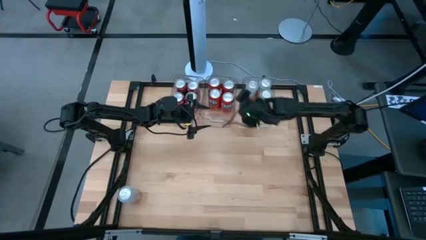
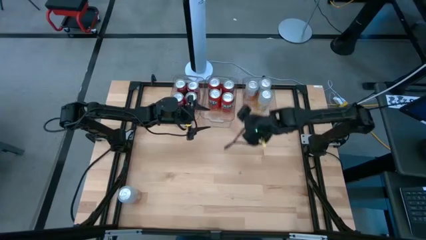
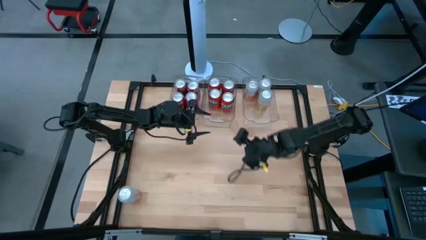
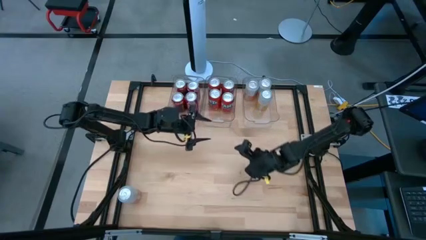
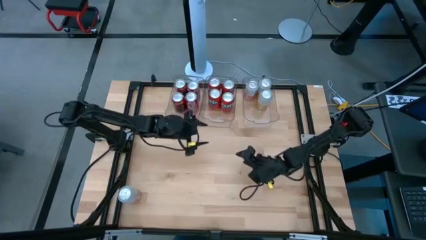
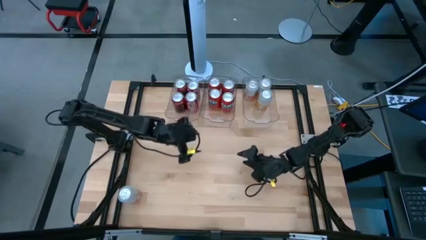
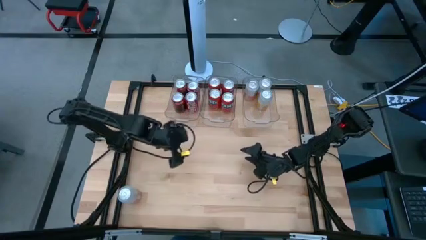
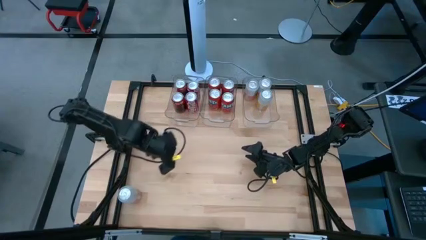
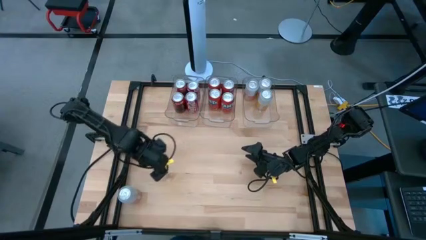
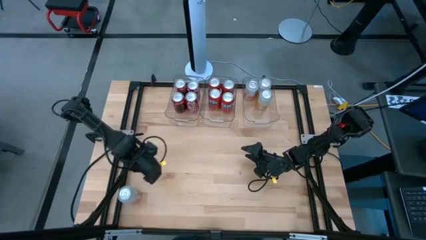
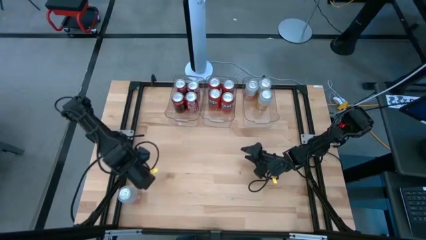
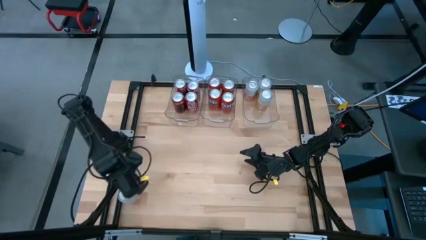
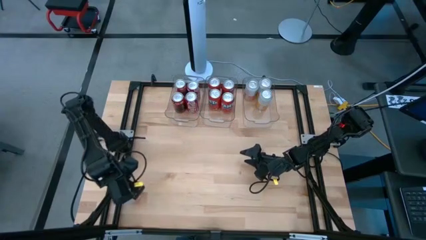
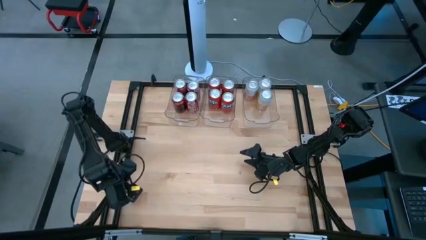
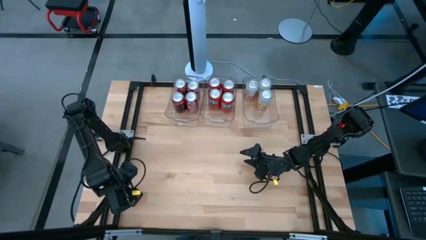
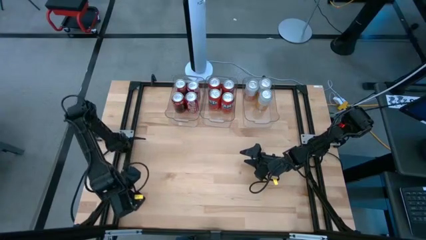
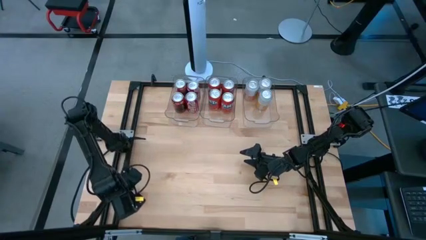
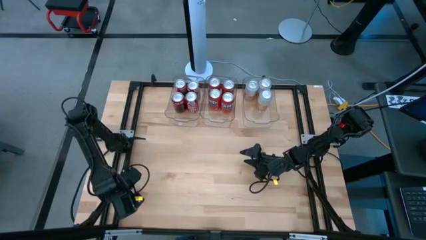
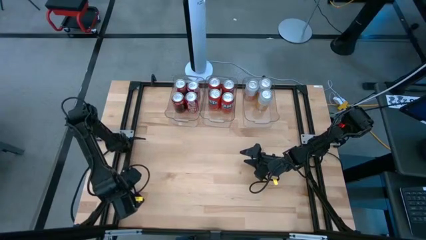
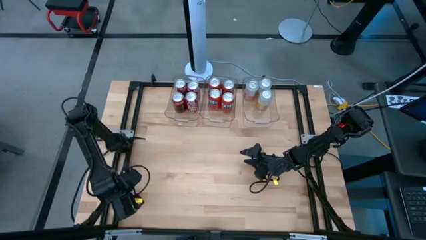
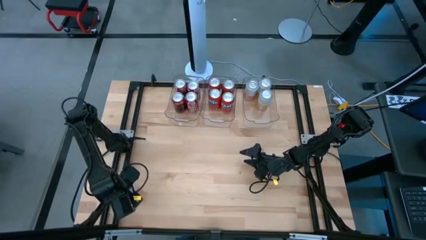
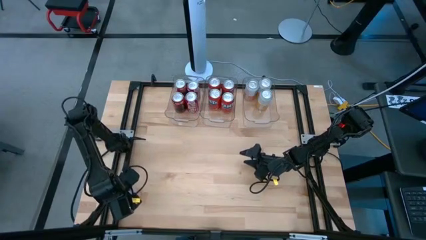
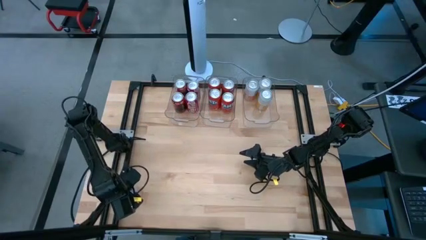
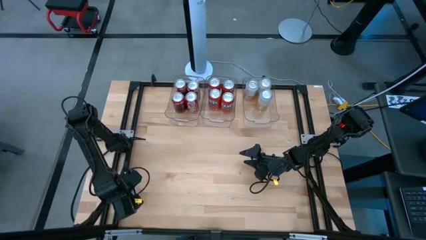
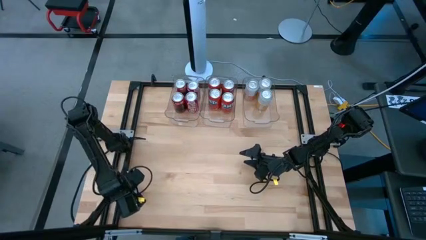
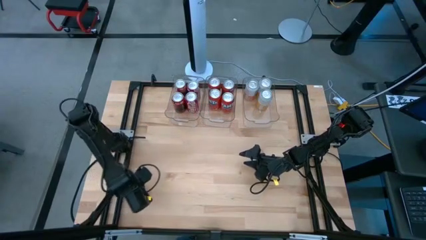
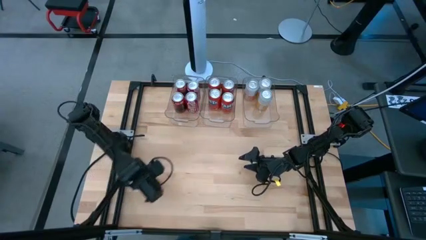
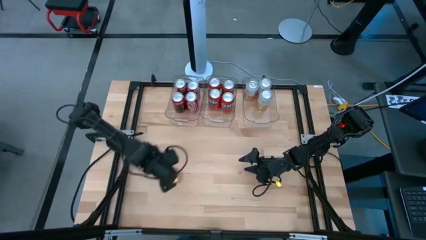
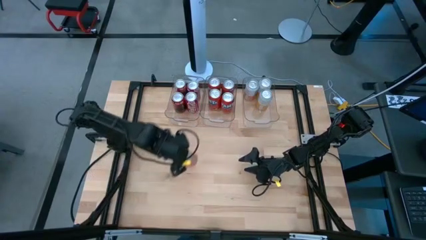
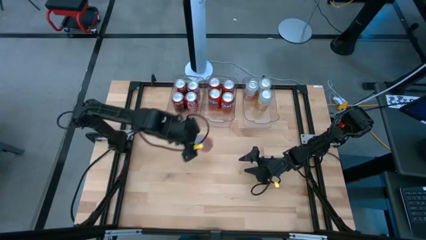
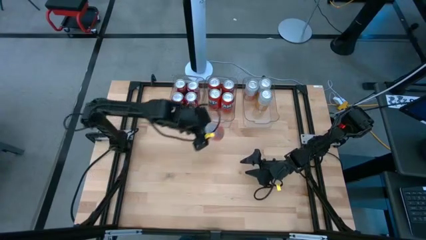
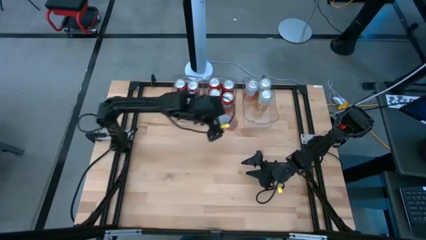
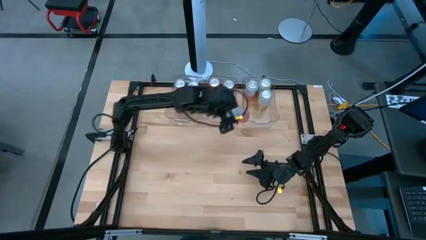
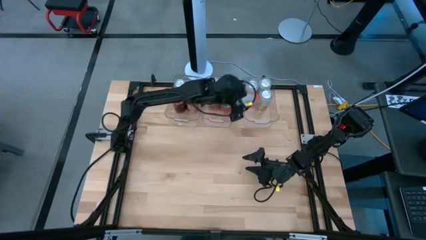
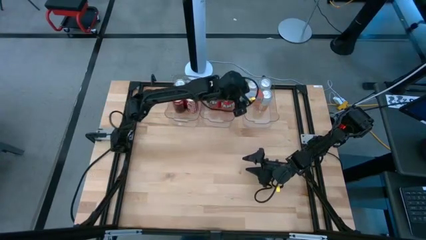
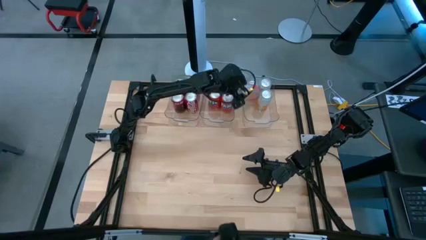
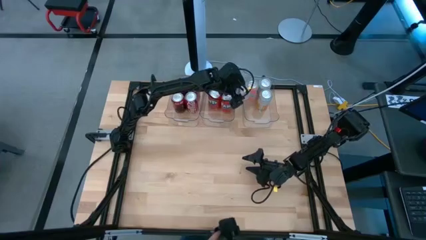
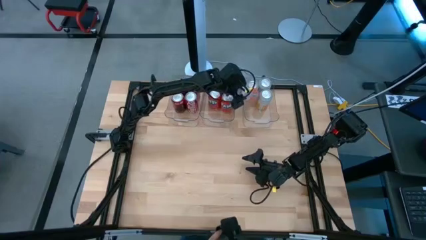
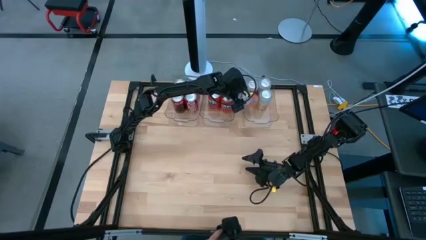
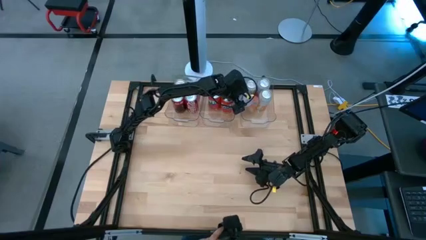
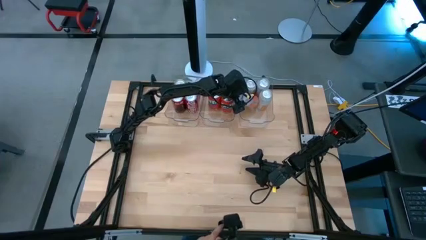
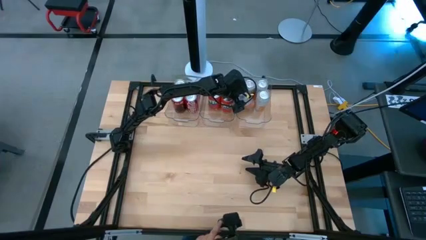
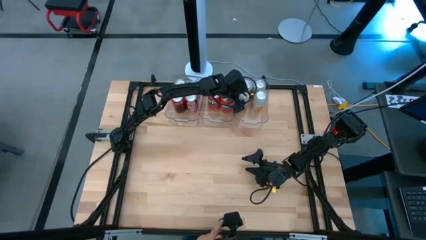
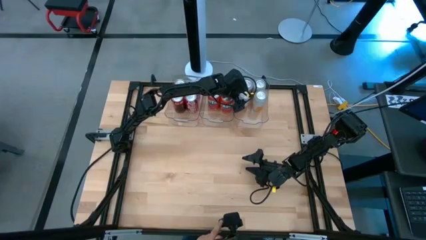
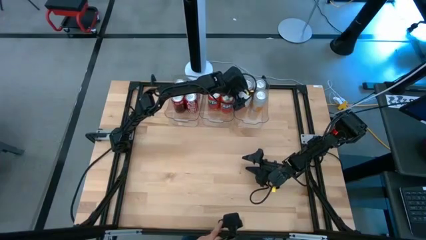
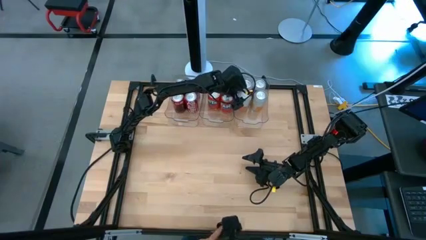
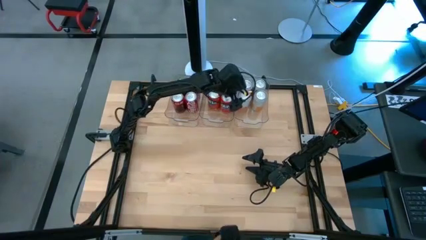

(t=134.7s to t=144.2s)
Task: Sort soda cans
Put the white soda can into the right transparent bin

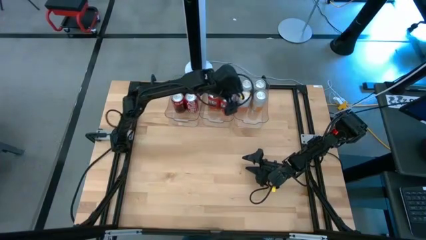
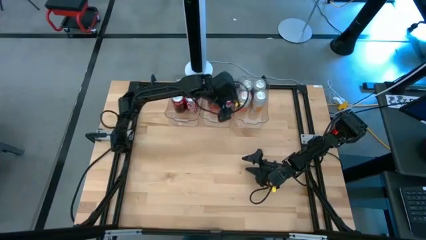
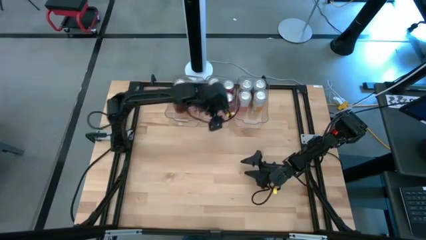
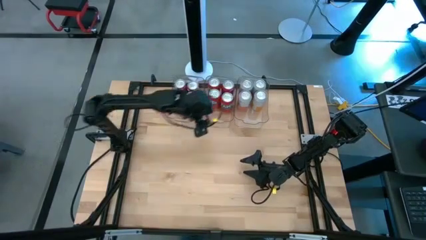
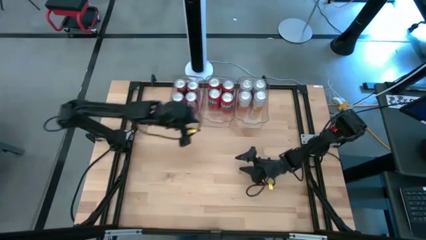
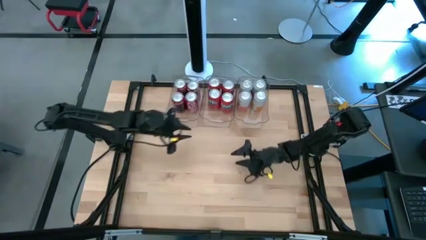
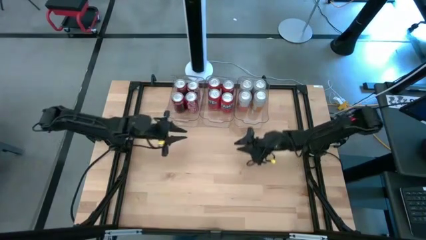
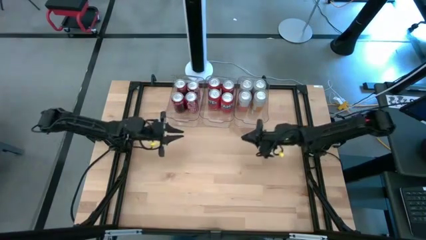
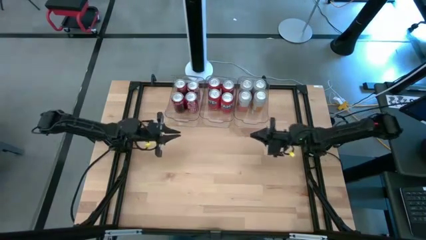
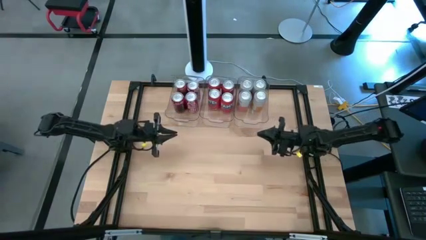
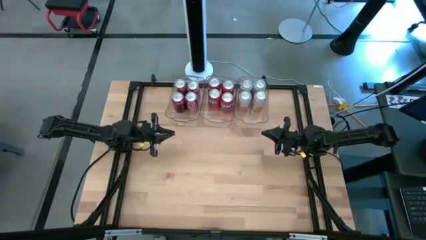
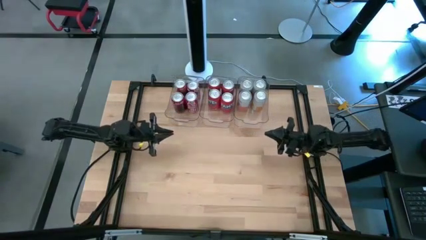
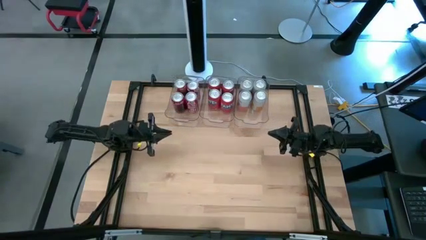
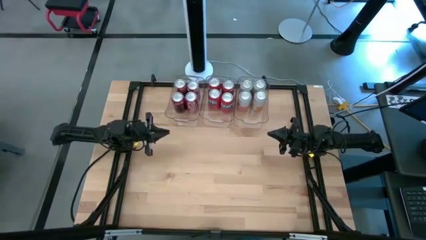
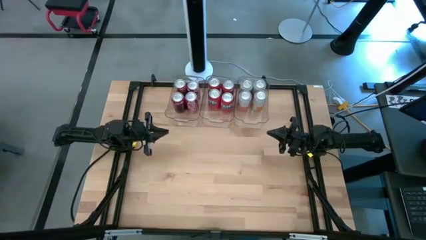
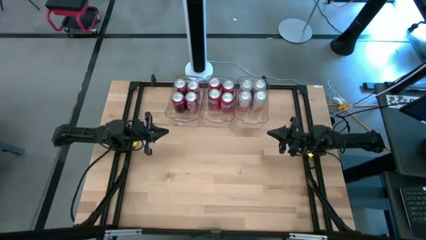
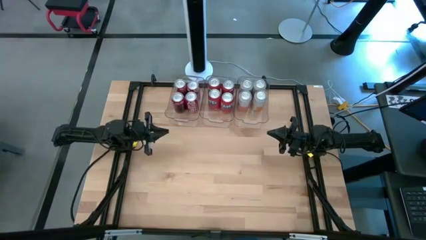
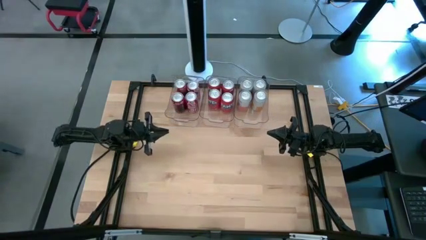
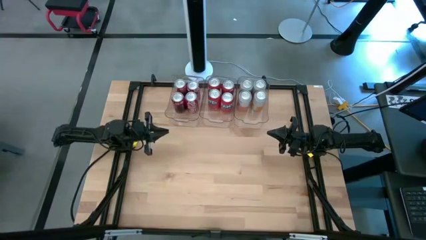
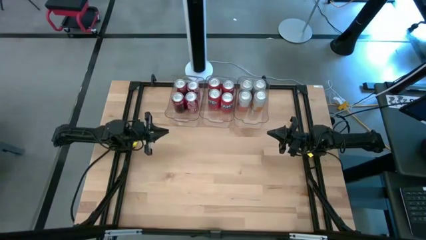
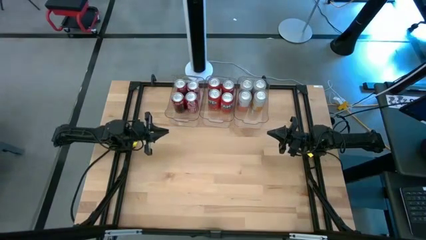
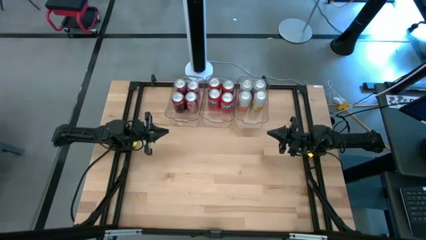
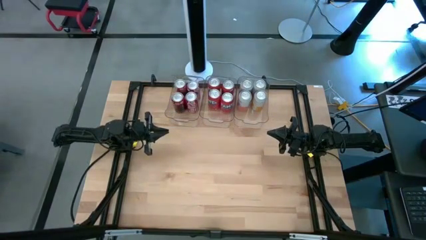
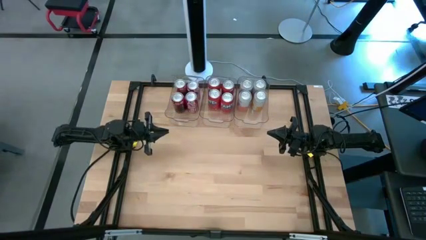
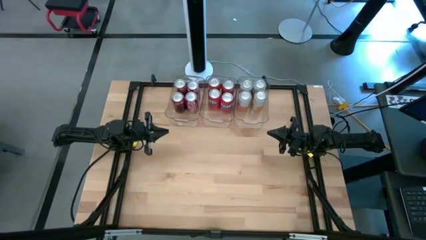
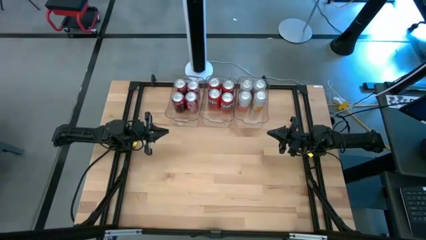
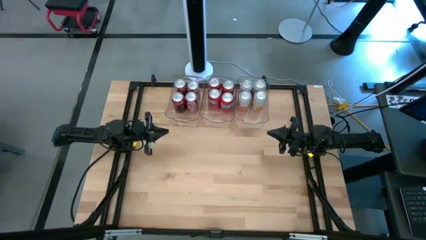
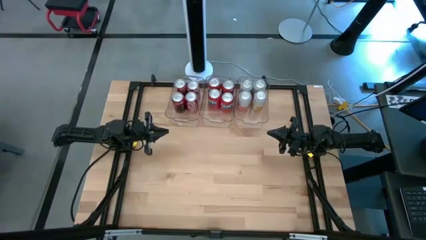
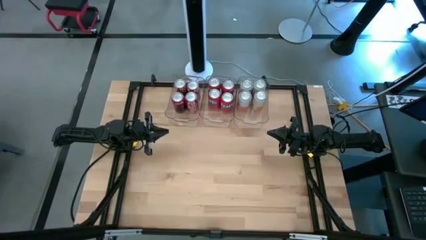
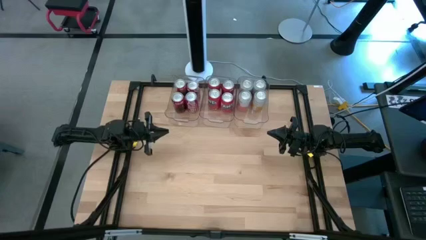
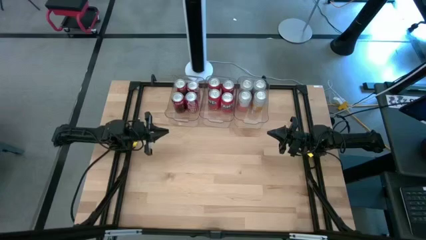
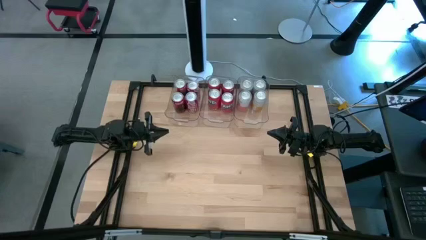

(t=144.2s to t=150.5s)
Return to home position
